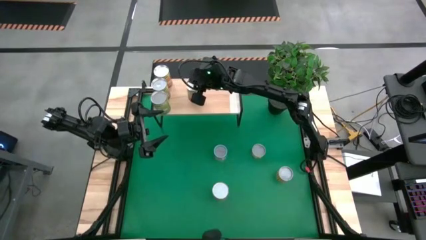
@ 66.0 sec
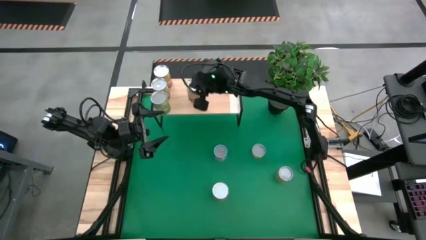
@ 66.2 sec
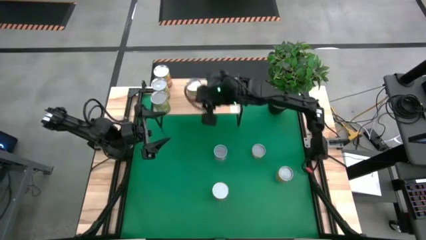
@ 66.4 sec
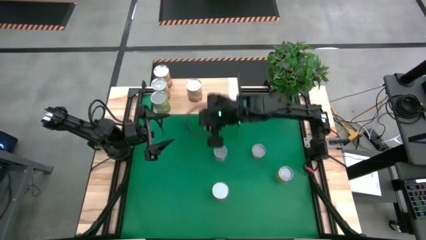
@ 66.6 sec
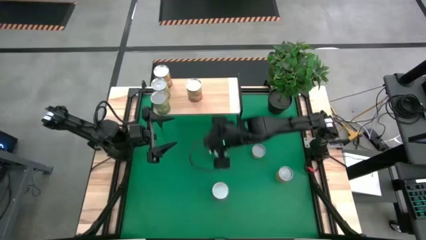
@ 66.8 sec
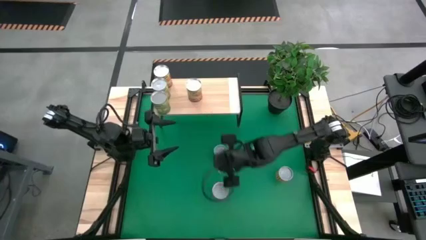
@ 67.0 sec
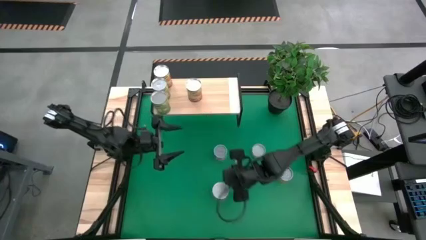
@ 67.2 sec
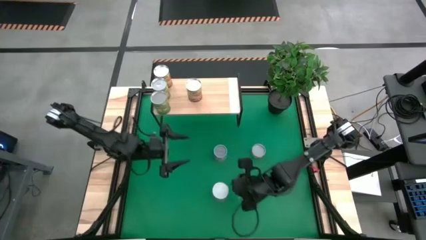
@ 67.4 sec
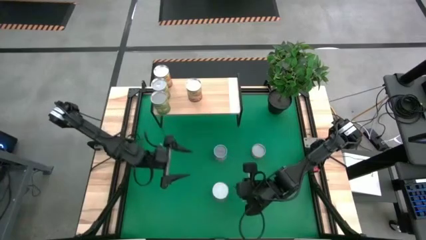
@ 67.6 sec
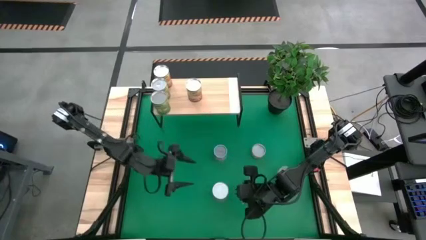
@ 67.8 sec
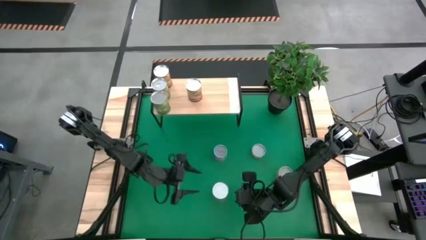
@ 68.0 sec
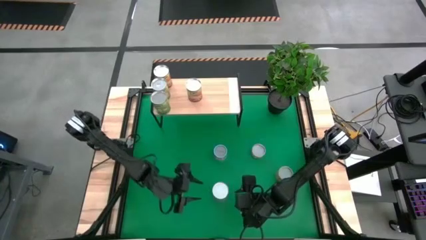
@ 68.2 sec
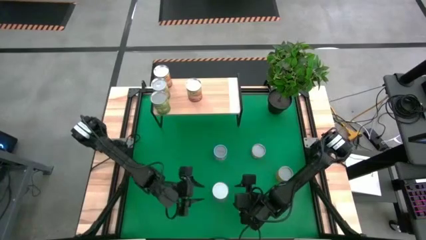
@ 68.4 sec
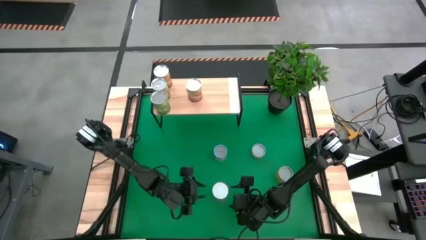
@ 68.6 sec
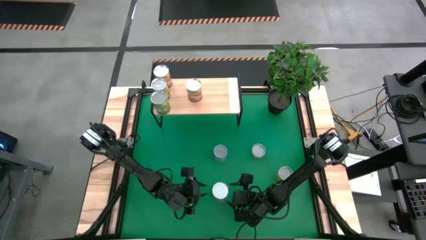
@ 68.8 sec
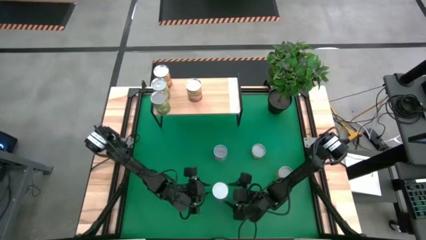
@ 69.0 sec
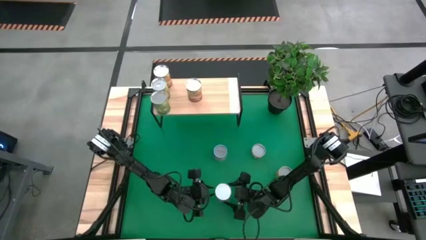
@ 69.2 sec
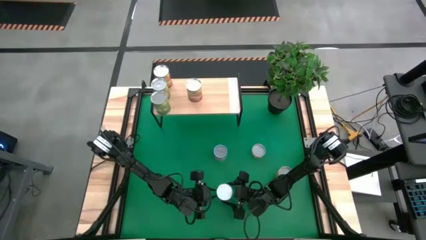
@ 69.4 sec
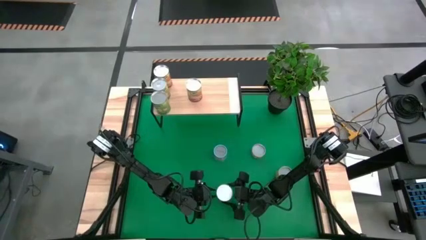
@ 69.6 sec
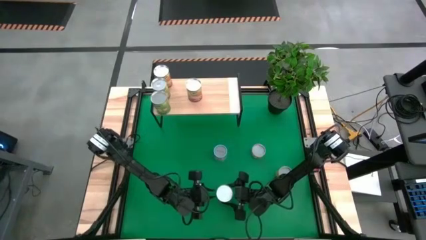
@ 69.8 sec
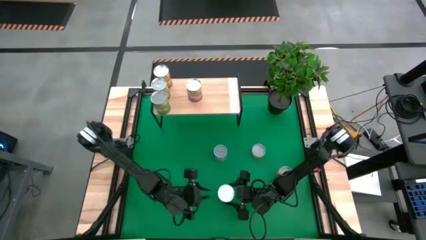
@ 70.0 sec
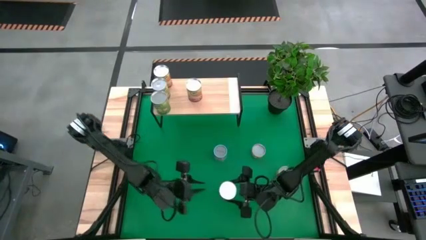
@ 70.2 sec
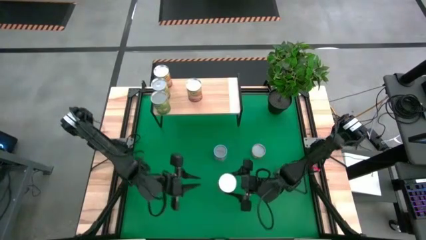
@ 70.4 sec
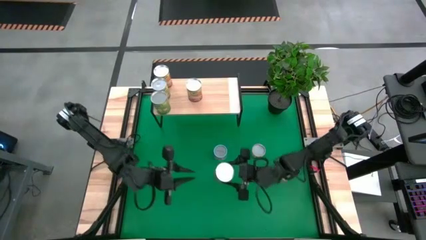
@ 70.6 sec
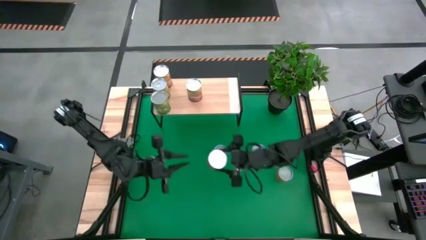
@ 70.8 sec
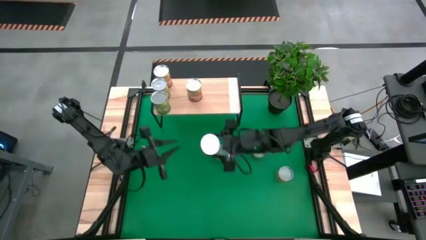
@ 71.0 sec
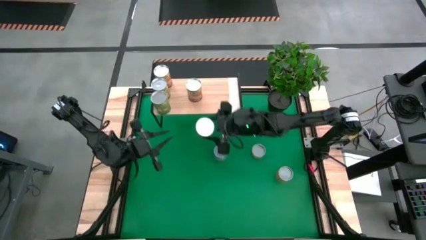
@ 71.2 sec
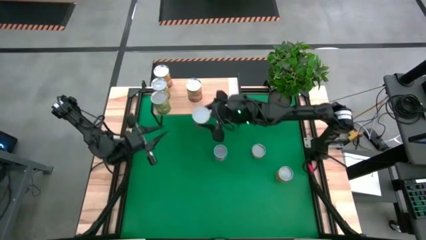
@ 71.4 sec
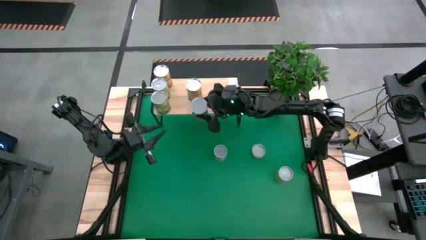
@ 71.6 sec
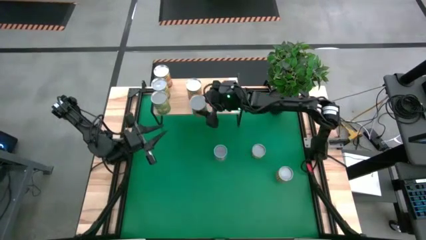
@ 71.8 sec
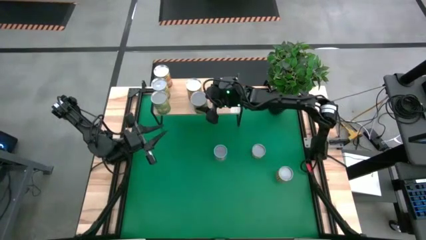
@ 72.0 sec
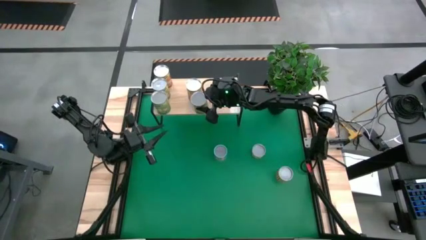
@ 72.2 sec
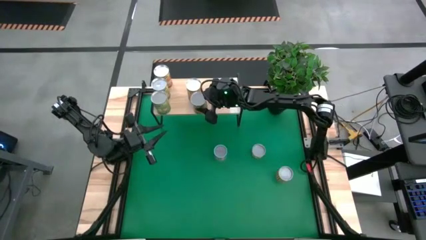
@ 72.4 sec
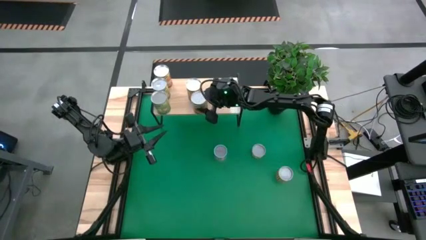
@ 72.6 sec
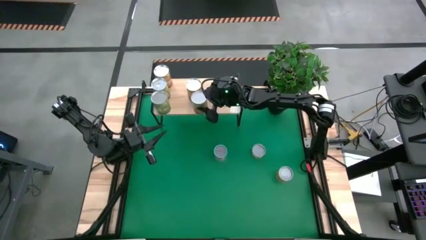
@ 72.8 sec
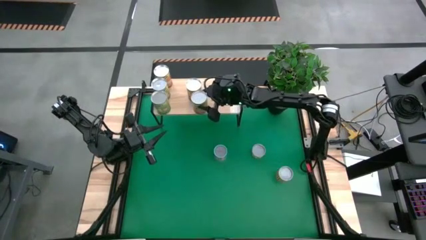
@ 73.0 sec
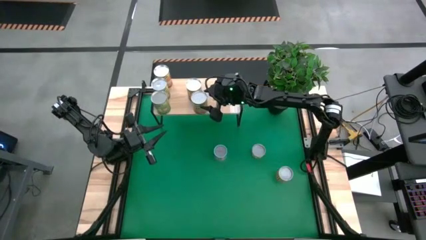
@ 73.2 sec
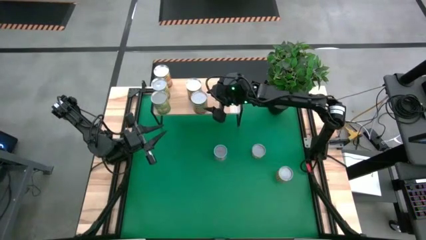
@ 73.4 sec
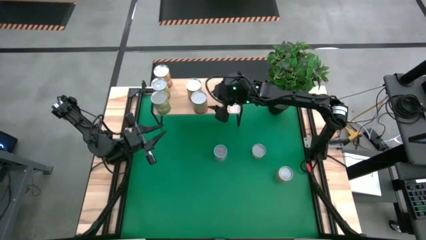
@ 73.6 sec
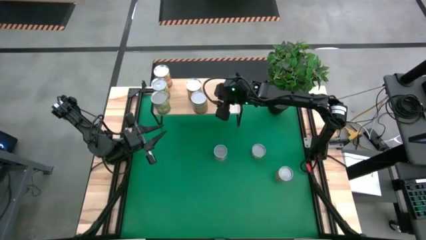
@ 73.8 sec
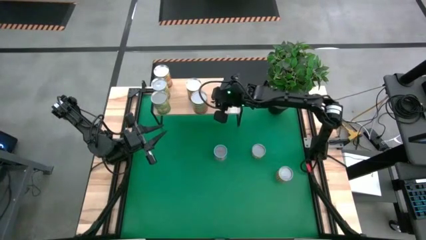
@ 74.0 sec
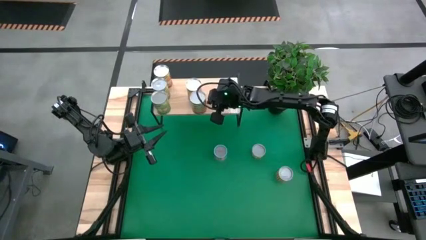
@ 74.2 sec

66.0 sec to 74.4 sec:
Task: Pick and place cans onto a shelf
Put the green bean can on the shelf

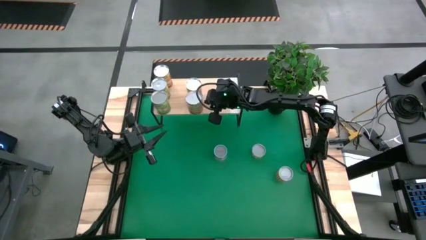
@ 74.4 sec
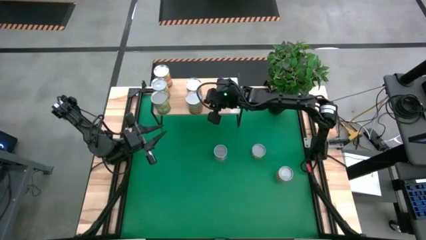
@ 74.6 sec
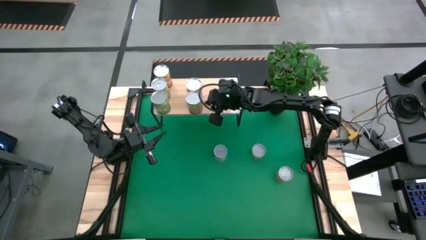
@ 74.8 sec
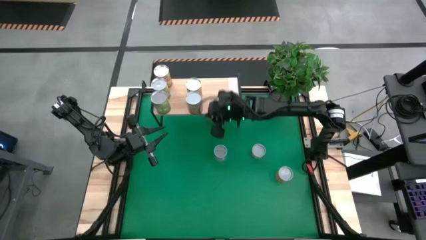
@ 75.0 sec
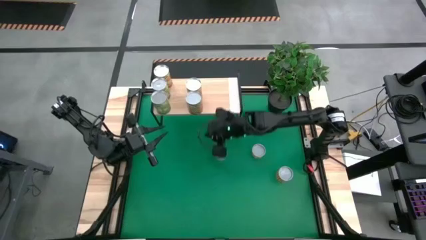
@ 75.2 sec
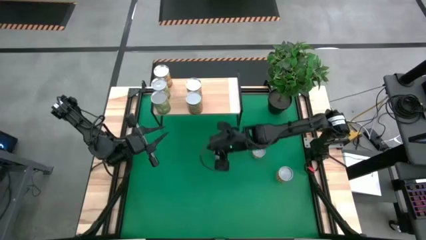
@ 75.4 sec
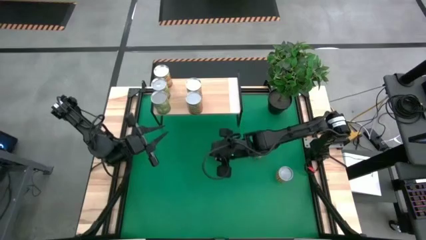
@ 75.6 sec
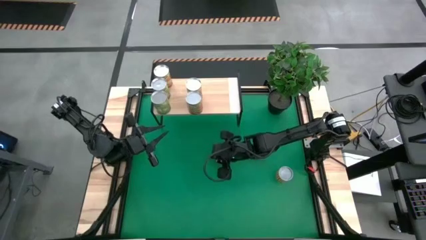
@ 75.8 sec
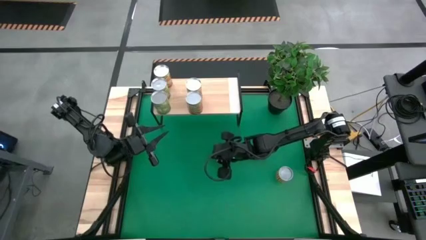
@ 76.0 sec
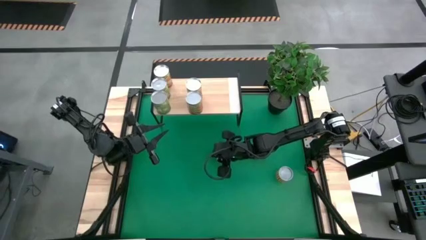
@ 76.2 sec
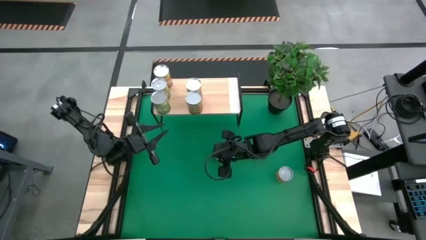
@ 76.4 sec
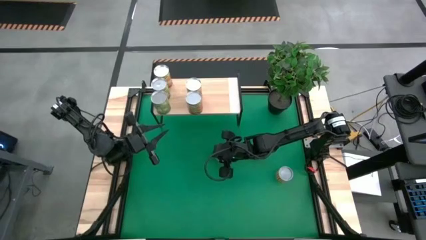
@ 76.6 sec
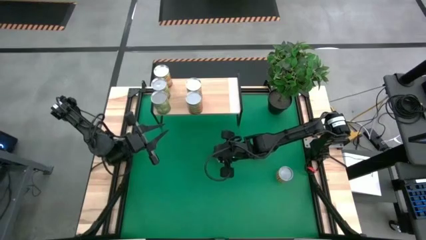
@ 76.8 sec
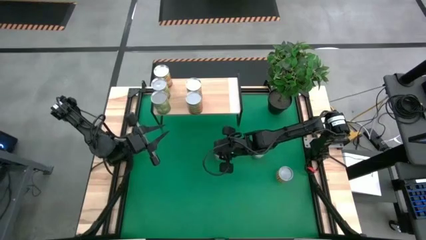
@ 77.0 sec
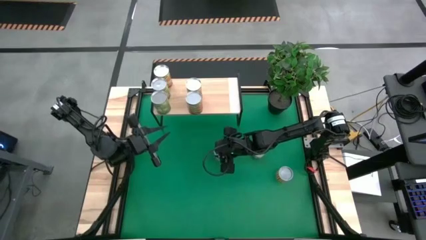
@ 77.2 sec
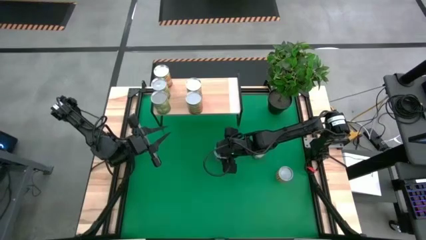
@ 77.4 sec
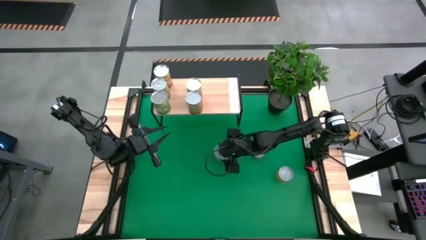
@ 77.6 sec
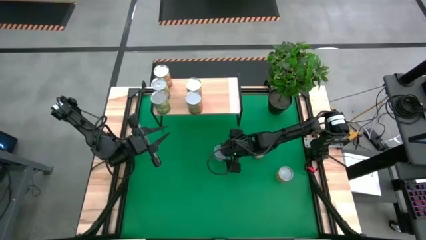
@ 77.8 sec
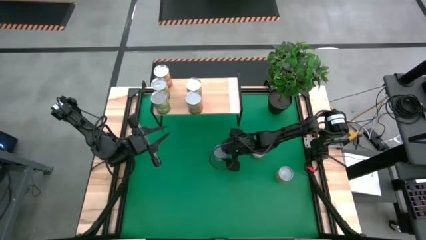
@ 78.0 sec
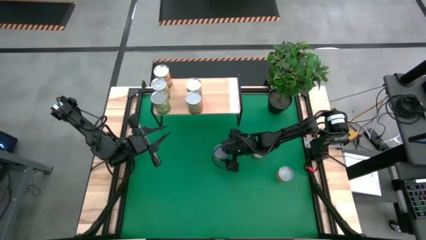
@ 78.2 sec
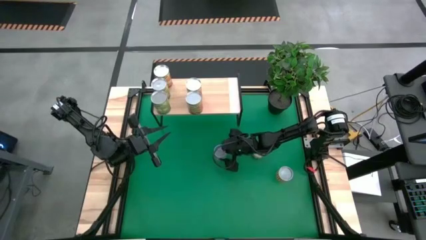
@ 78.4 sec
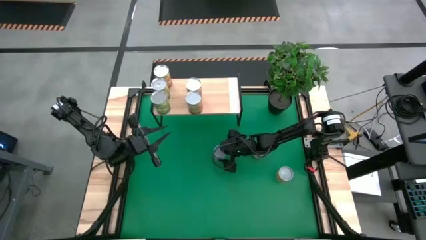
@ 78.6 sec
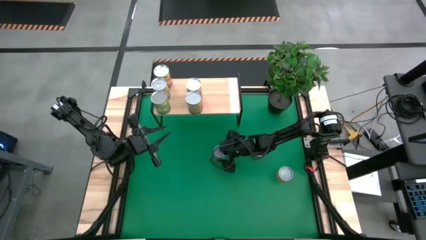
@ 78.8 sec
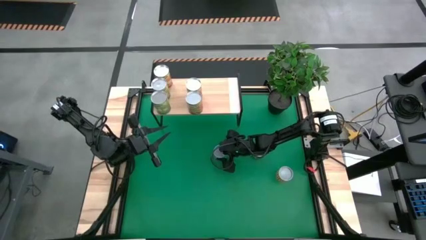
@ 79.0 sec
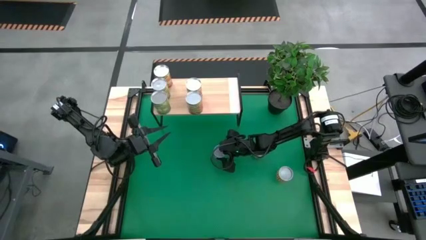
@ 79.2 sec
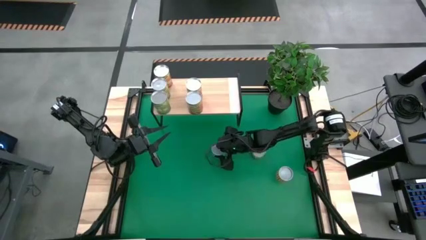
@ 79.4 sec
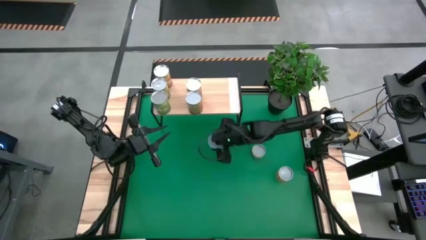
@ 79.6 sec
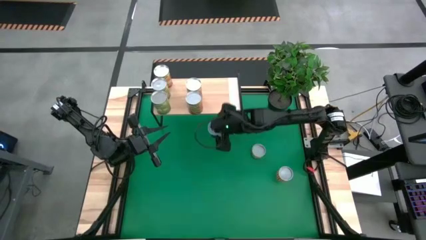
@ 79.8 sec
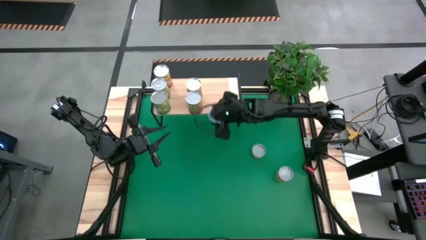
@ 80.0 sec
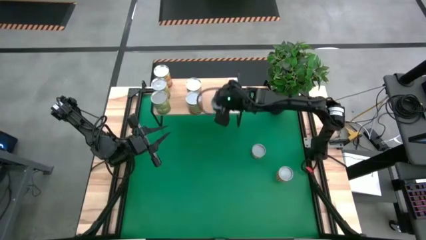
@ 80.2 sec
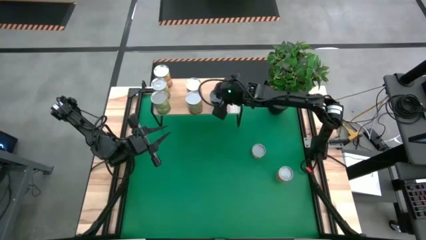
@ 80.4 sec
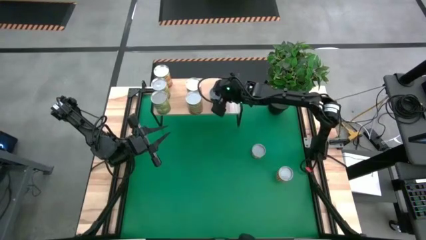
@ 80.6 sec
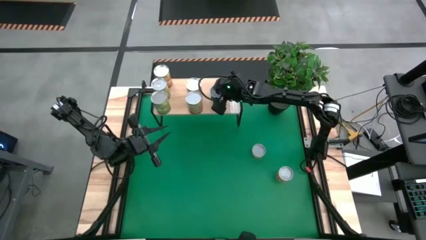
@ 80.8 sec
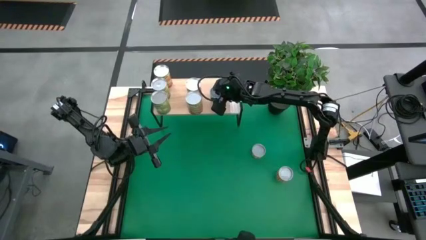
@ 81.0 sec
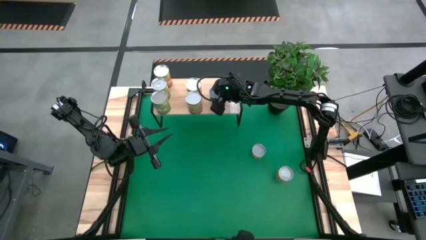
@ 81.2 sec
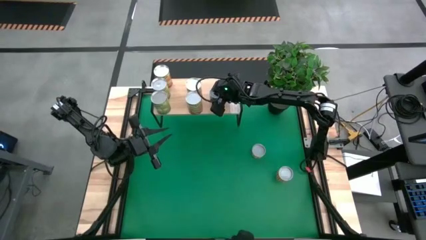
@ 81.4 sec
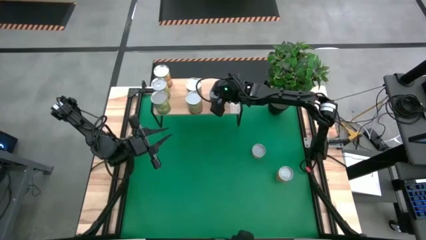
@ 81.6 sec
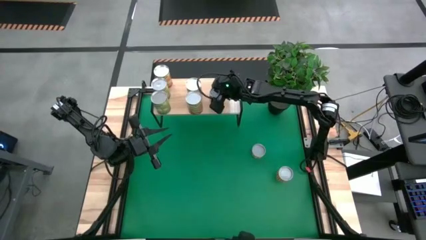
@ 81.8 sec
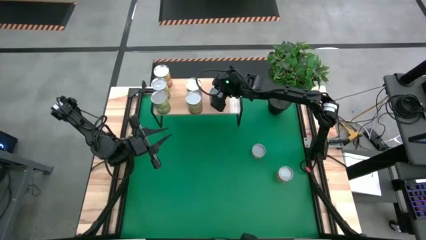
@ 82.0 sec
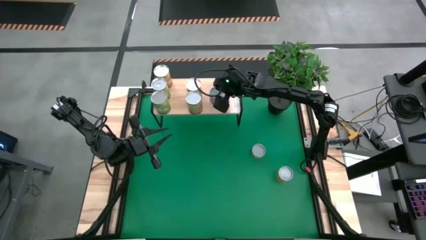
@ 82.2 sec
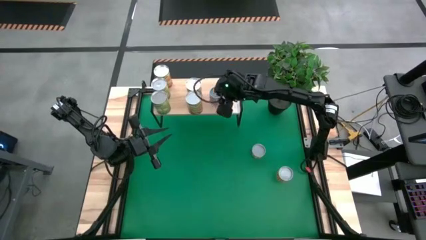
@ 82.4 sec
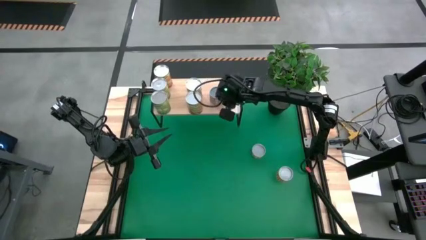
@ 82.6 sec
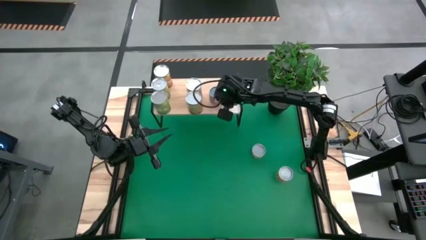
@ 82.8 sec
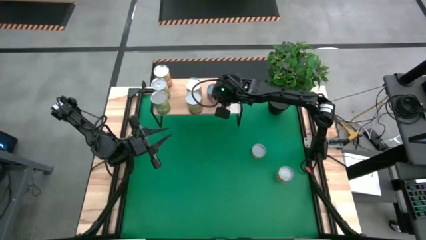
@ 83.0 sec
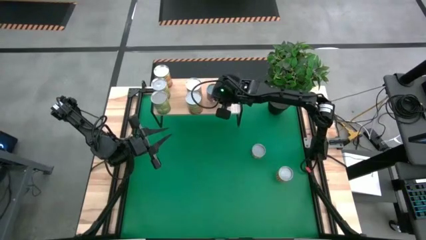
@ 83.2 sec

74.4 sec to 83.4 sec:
Put the blue small corn can on the shelf
